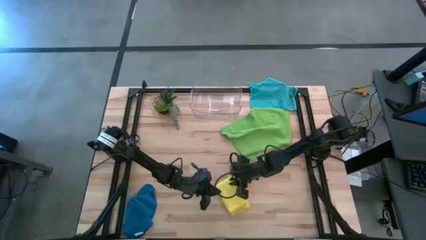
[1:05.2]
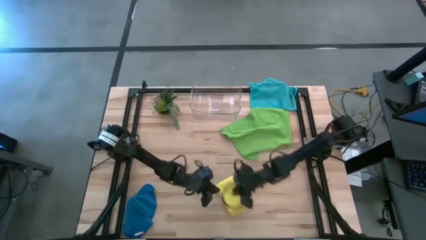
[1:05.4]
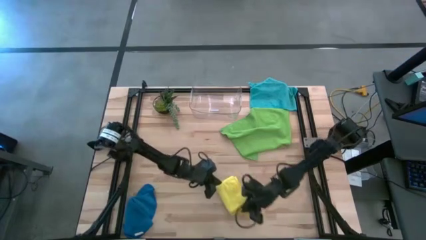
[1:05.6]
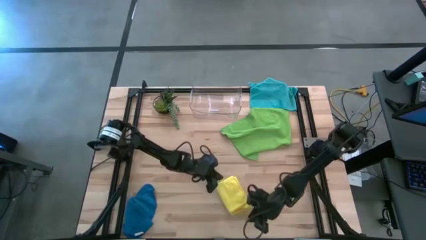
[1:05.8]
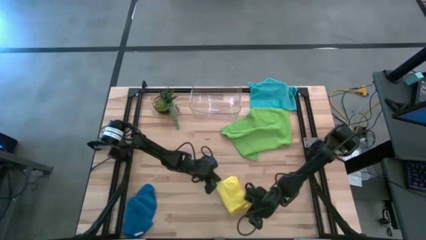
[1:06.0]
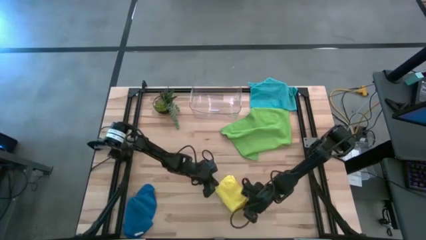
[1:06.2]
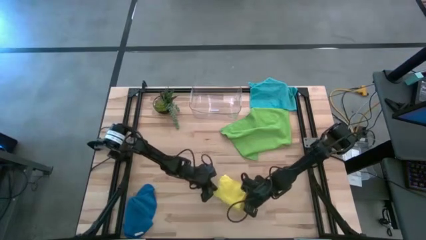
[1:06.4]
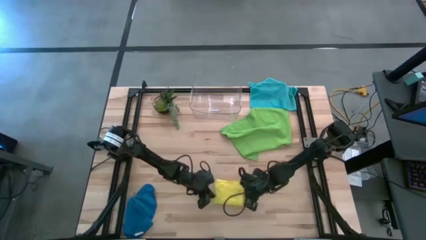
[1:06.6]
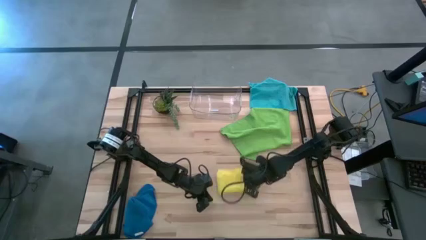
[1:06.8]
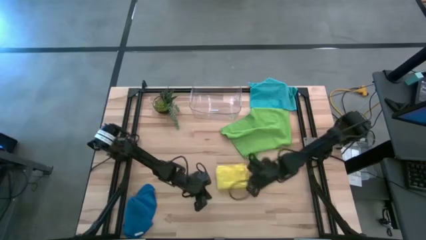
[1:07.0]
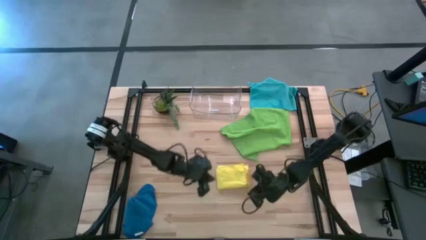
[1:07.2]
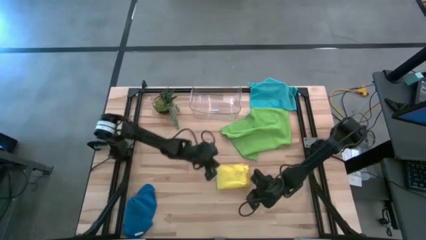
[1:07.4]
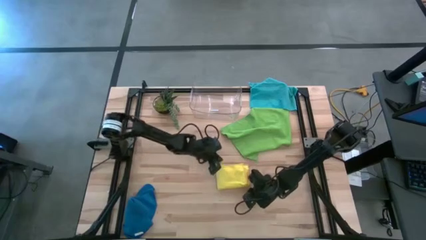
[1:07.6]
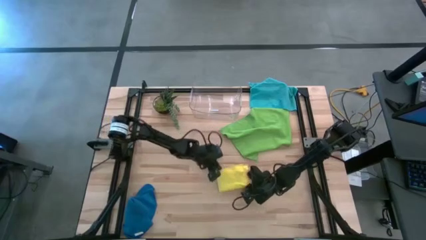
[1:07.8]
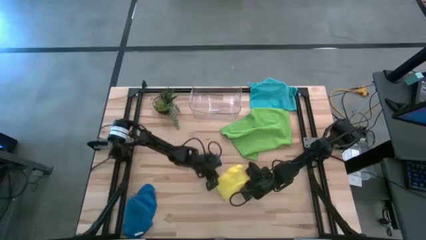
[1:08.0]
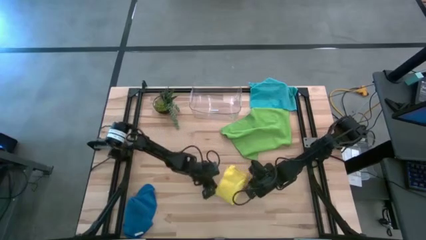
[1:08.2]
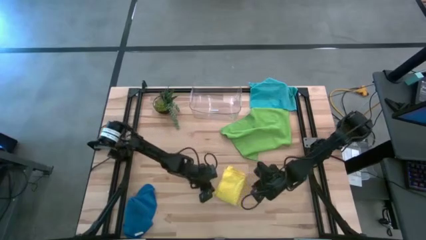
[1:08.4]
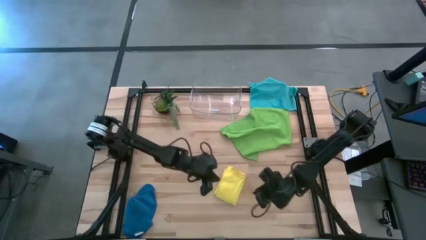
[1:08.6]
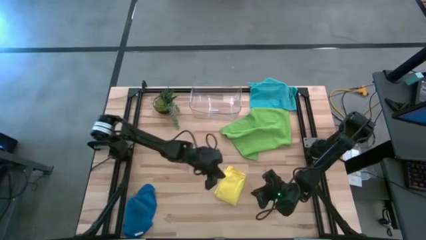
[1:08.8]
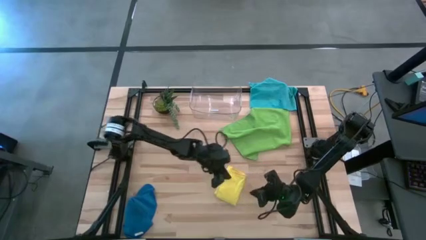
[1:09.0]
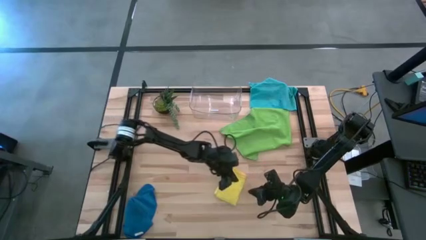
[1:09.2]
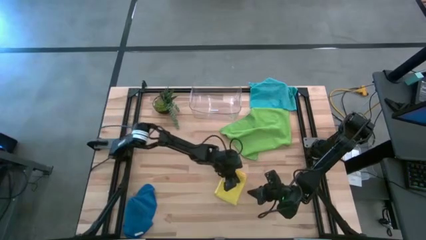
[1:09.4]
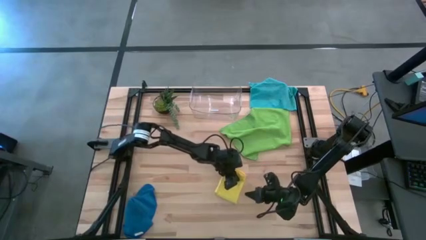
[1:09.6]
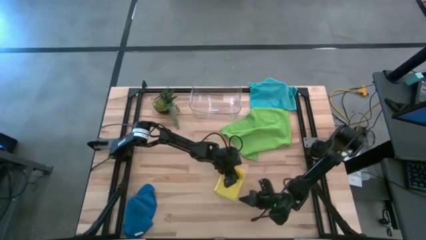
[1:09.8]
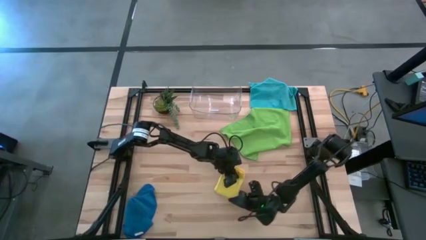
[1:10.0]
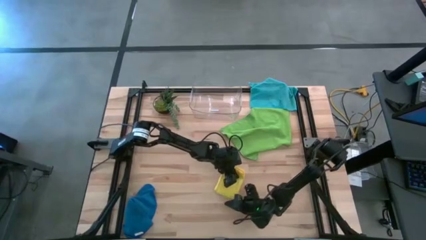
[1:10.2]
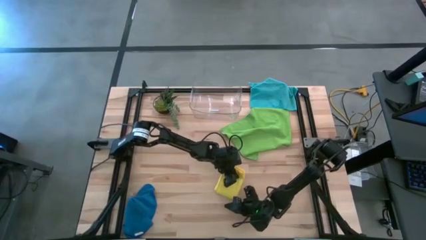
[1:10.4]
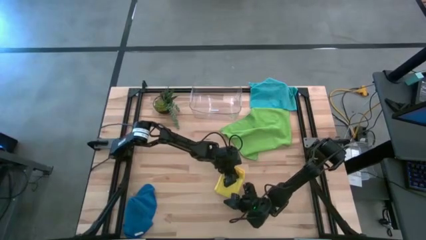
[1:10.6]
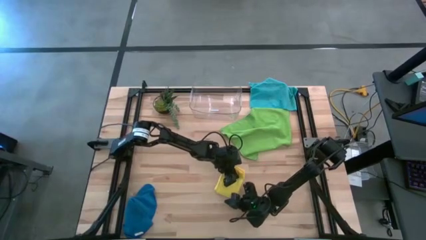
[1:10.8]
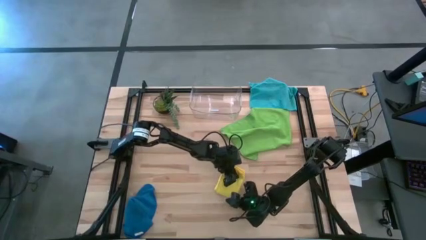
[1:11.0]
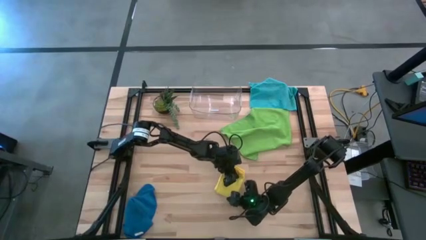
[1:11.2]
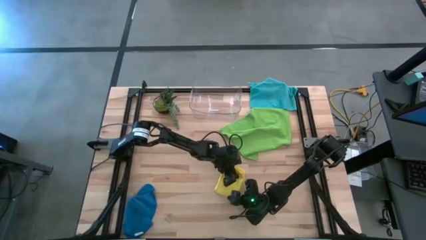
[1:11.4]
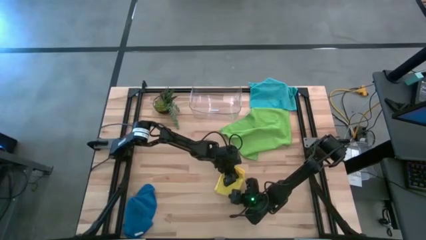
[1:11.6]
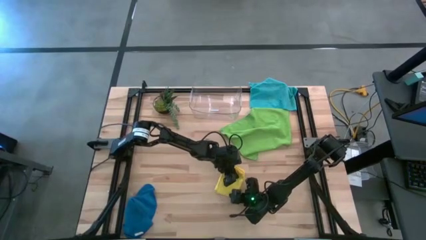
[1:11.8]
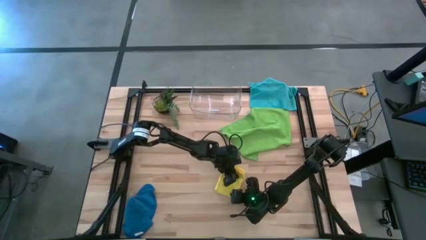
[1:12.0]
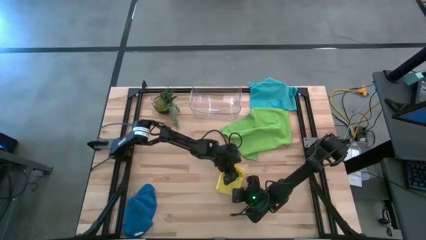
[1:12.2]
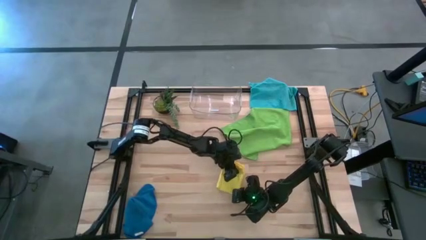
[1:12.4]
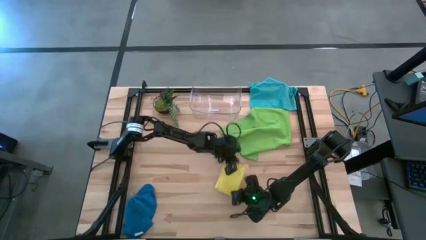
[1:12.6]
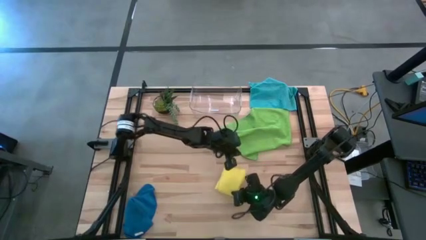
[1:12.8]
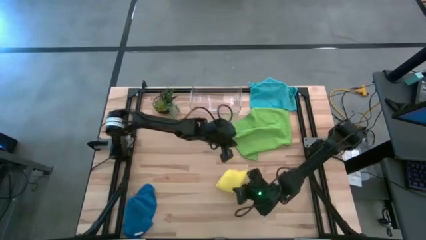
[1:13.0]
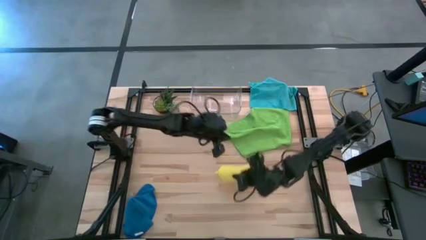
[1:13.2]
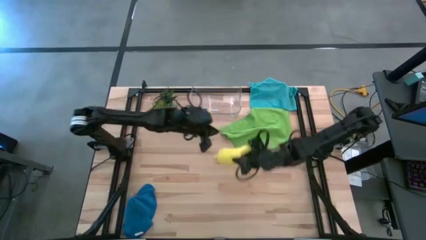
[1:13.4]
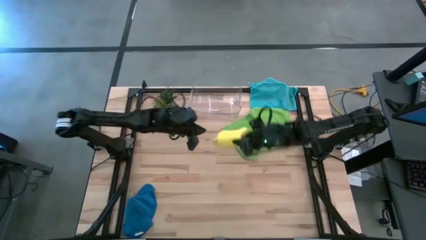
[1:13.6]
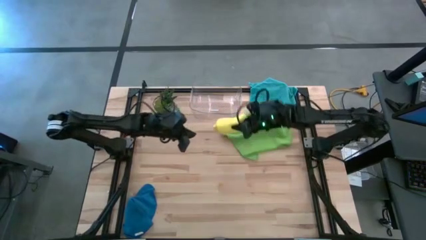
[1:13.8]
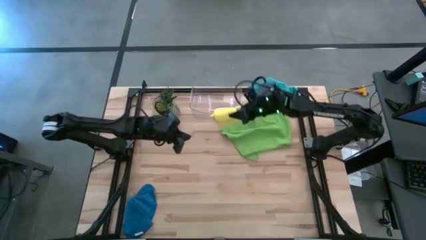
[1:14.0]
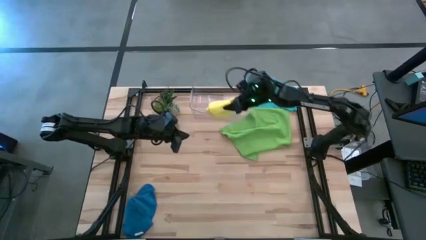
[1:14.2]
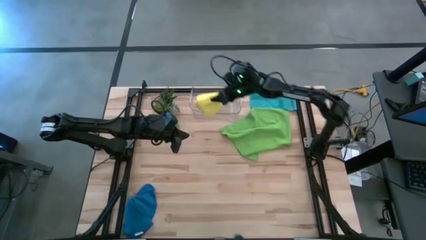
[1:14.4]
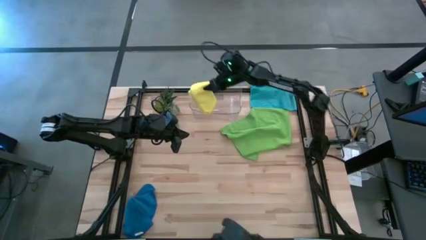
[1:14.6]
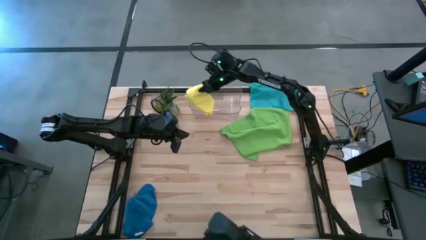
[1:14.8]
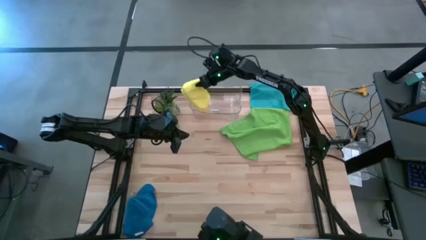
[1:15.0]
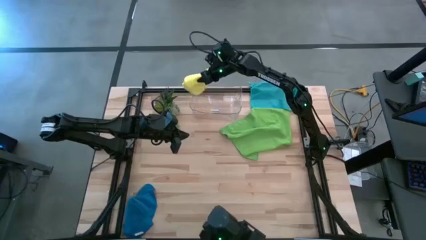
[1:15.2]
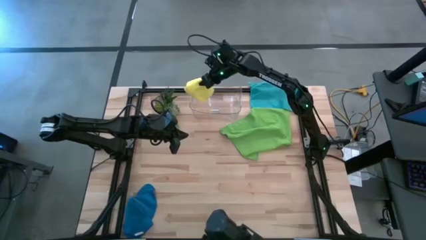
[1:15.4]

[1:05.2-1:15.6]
Task: Fold microfiber towels
Put the yellow towel into the bin

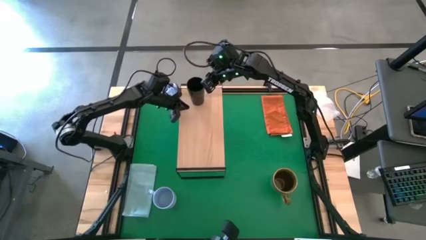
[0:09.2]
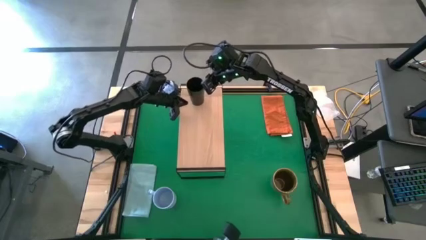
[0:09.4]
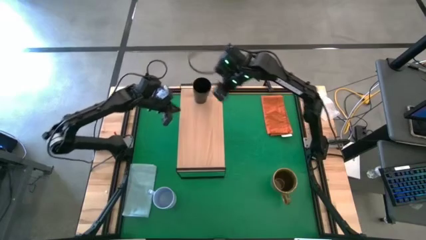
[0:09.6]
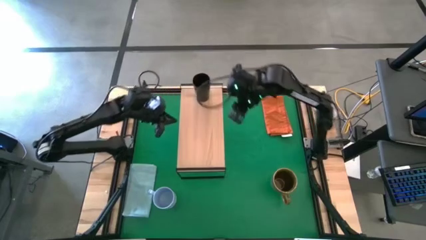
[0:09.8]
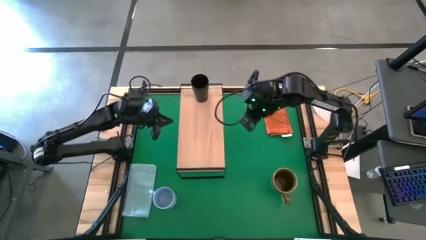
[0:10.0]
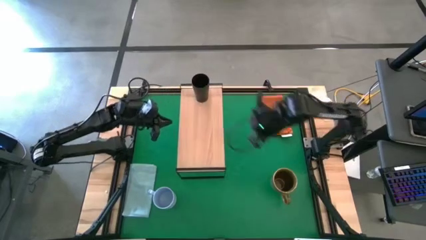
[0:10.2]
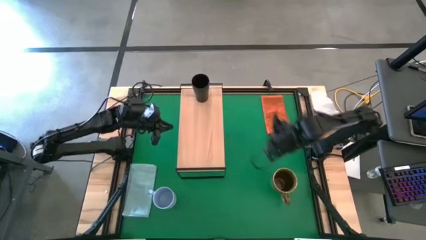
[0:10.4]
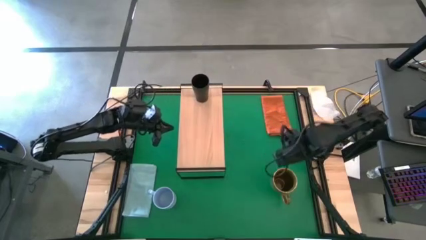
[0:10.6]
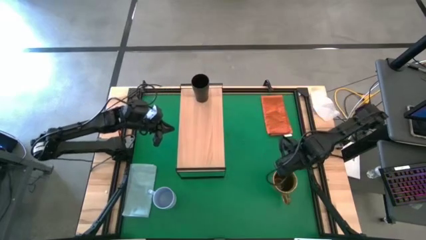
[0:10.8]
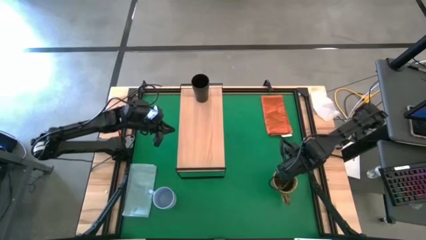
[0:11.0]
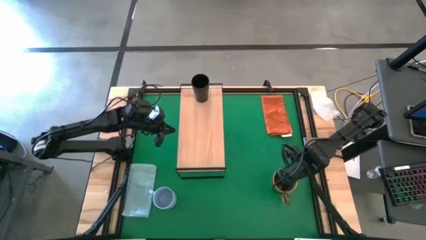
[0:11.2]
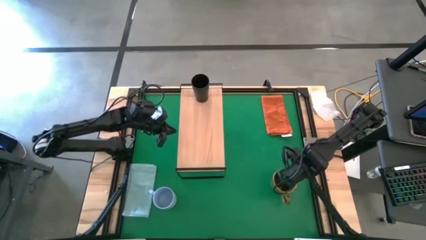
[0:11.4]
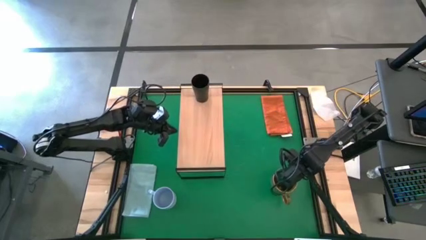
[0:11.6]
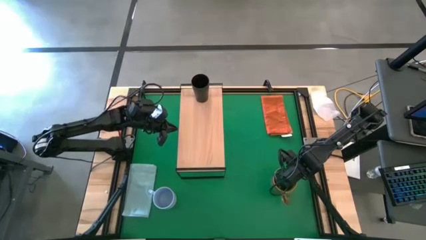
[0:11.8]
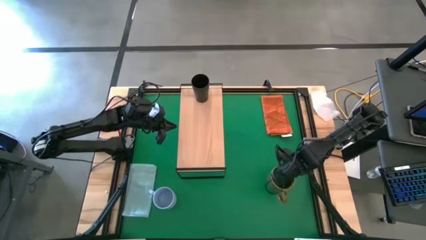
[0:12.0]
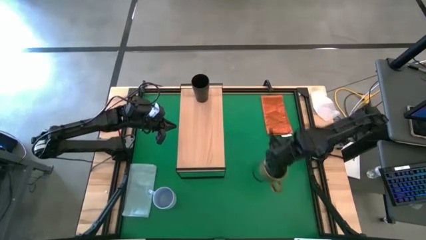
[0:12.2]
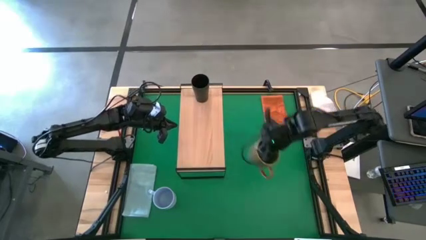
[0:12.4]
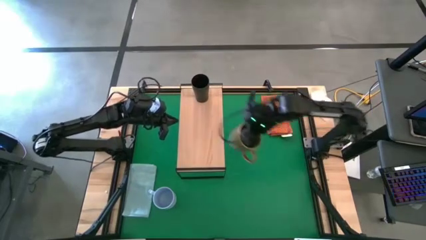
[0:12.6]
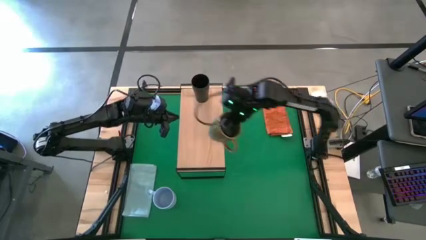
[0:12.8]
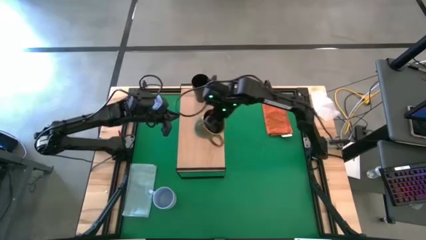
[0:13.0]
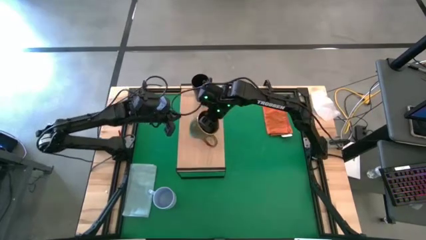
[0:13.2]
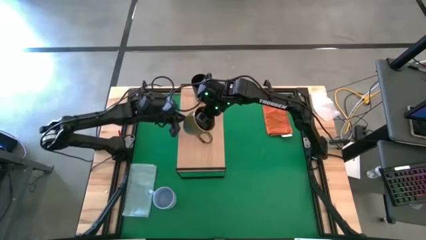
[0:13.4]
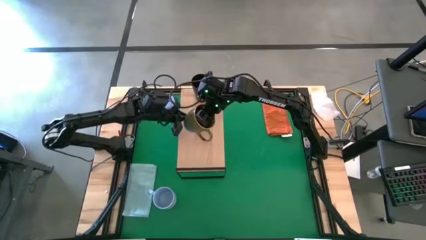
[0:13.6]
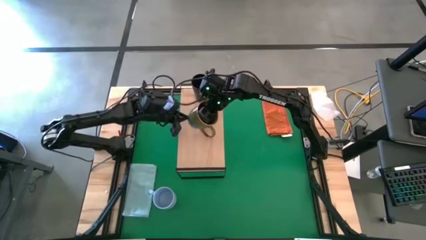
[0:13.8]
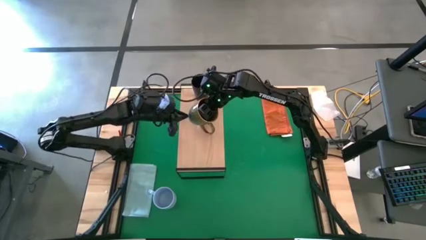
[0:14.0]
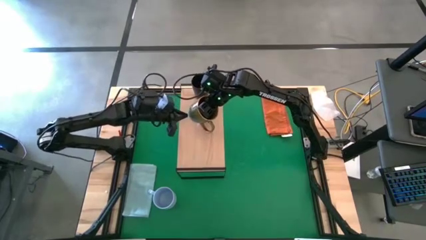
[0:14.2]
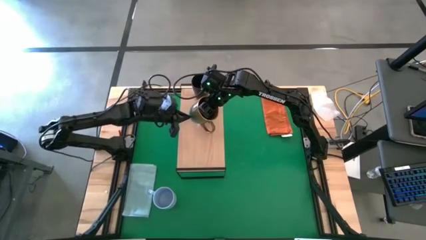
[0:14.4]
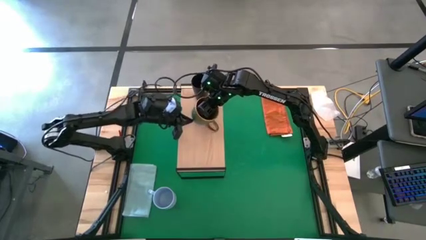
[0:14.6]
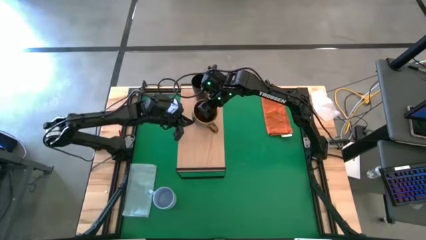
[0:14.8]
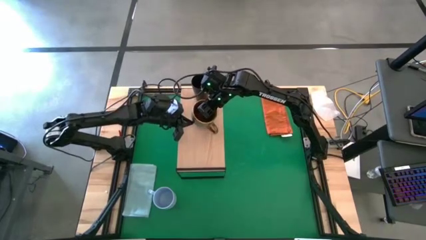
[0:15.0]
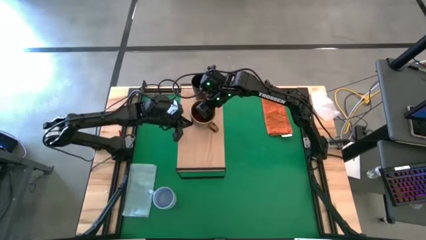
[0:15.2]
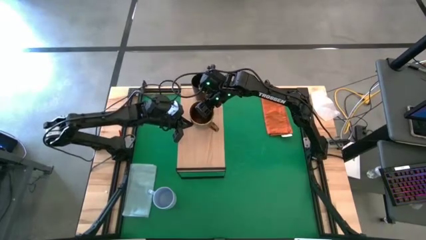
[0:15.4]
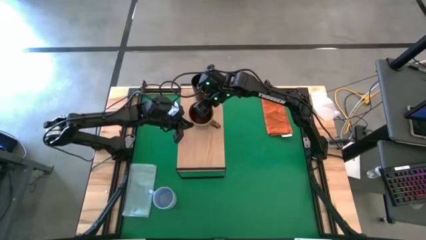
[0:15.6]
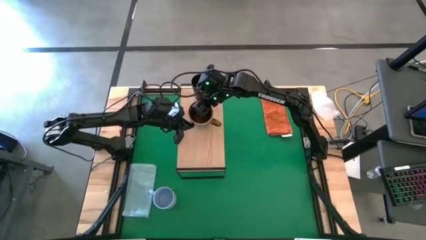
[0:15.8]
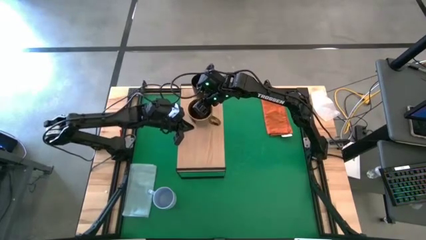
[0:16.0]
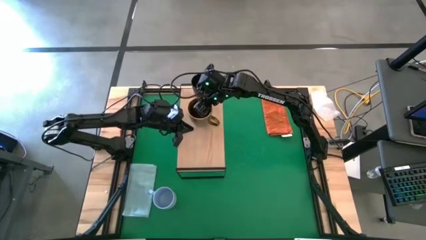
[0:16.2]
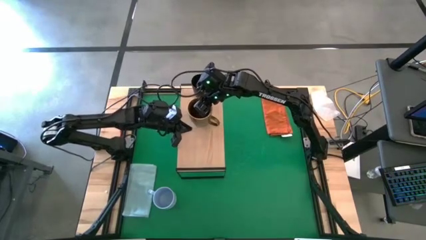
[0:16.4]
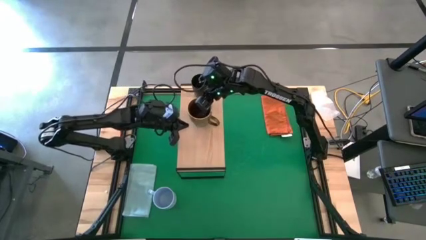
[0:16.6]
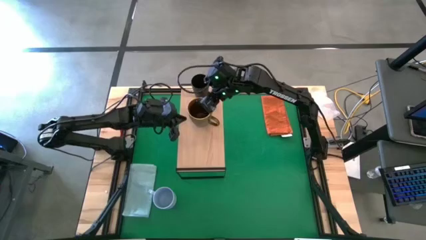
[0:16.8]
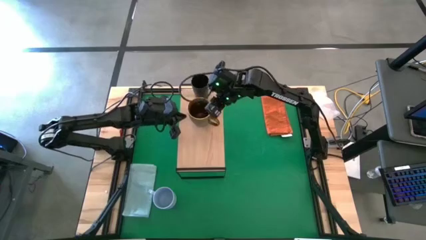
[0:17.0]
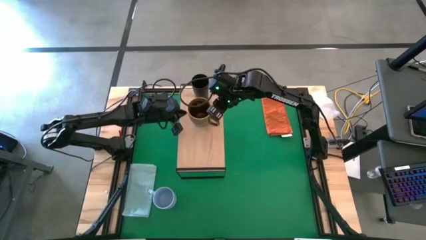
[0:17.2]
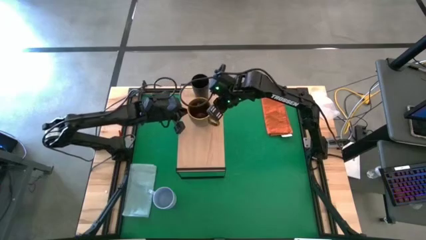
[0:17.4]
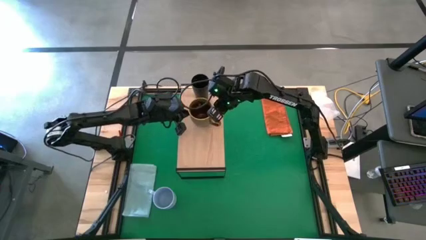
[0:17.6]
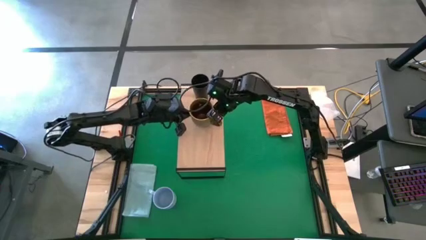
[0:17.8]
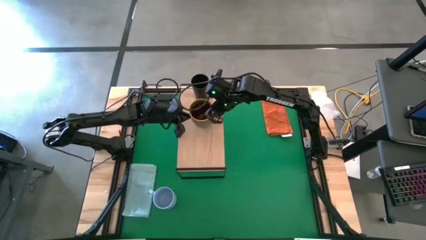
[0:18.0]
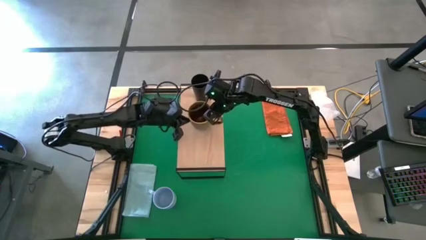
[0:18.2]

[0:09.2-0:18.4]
Task: Stack small to large cups/mugs on shelf
Put the brown-blue mug on the shelf
